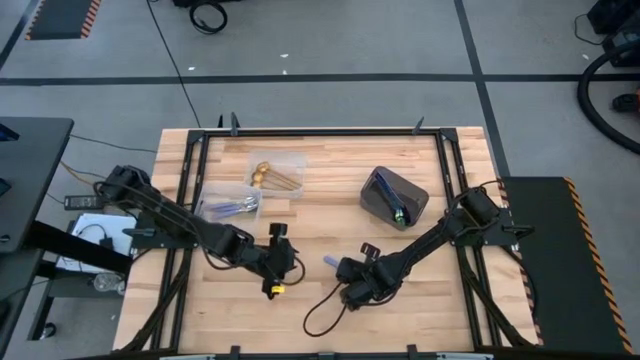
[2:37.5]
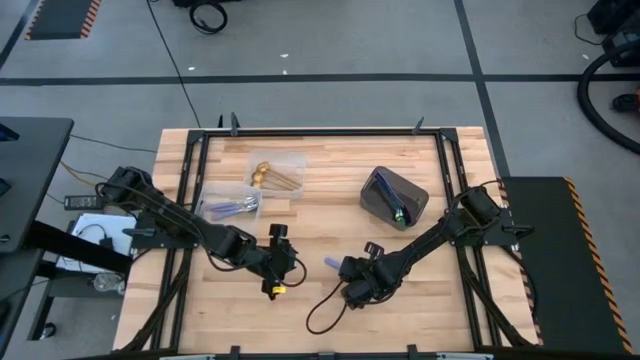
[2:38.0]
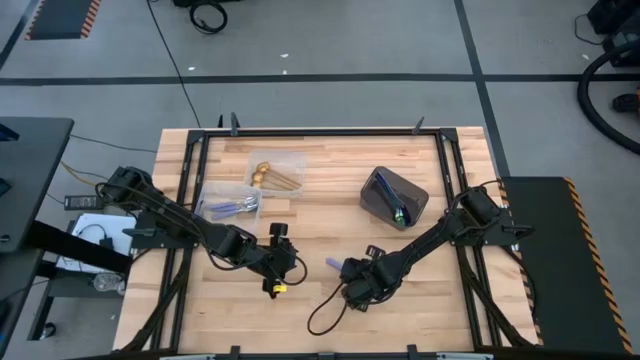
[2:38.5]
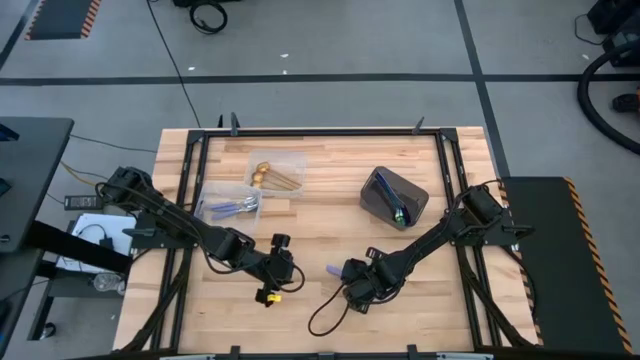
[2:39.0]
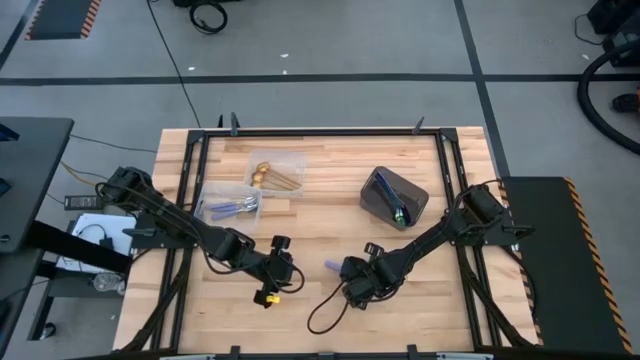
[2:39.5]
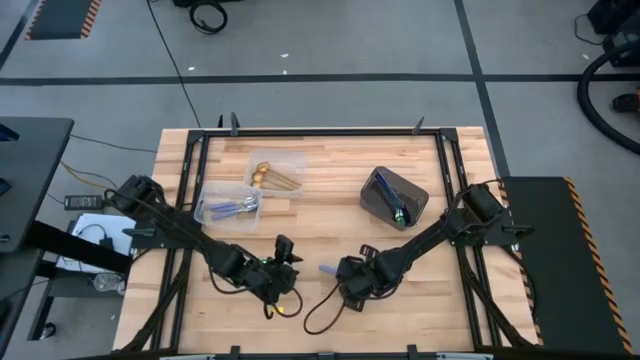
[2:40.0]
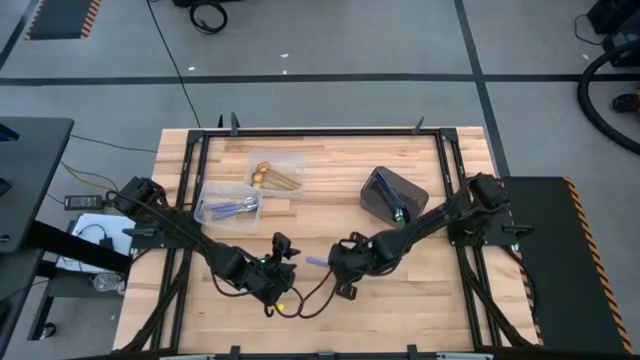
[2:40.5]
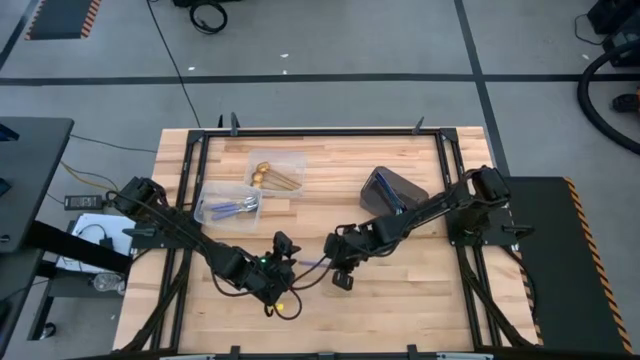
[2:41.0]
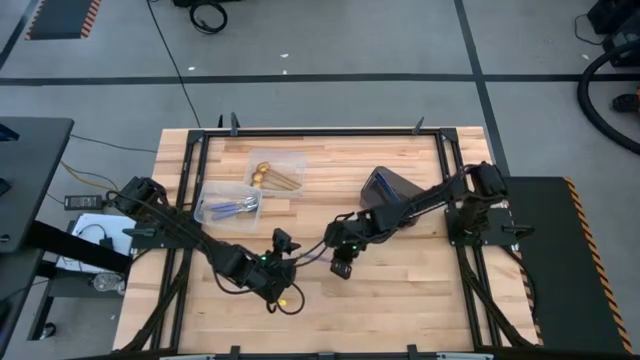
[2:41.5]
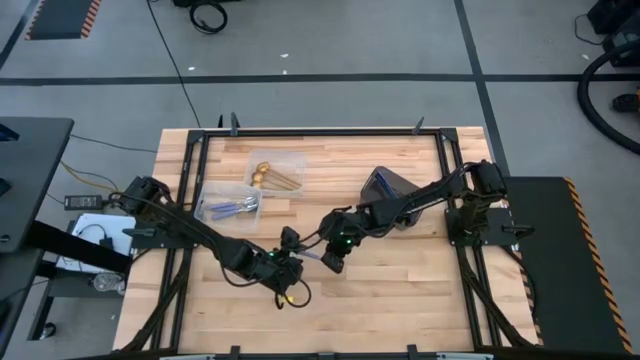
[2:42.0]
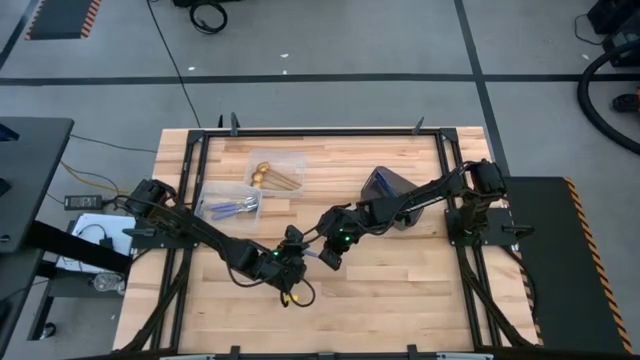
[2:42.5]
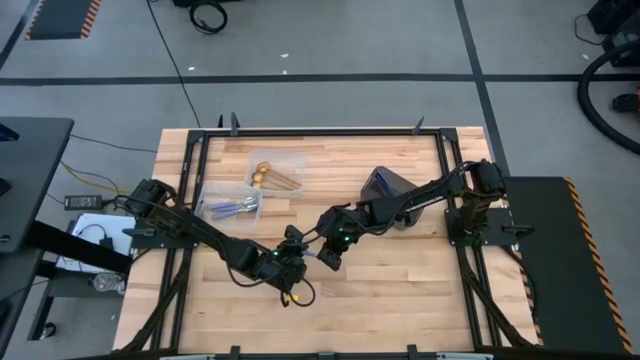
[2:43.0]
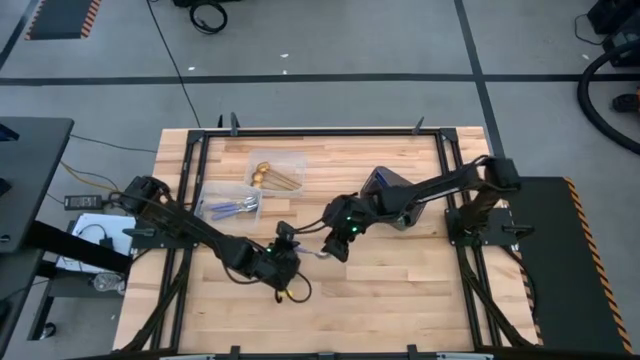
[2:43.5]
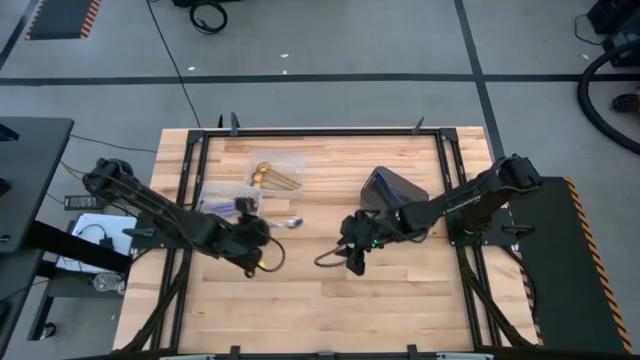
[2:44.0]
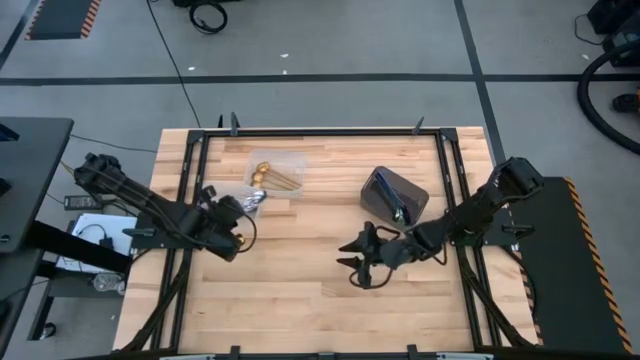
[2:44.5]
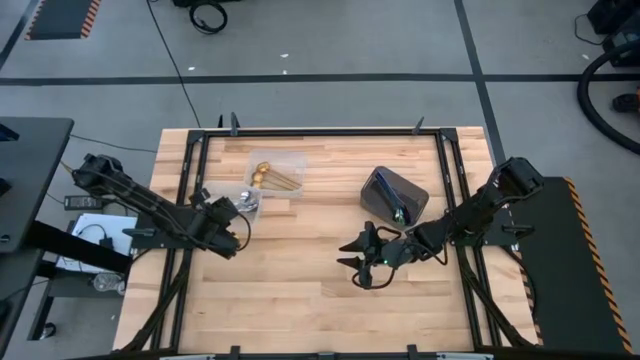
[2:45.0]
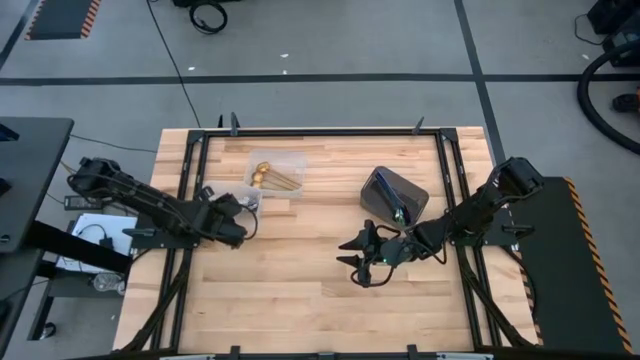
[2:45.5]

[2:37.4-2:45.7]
Task: Sort silverware by color (type)
Put the blue spoon into the bottom transparent bin

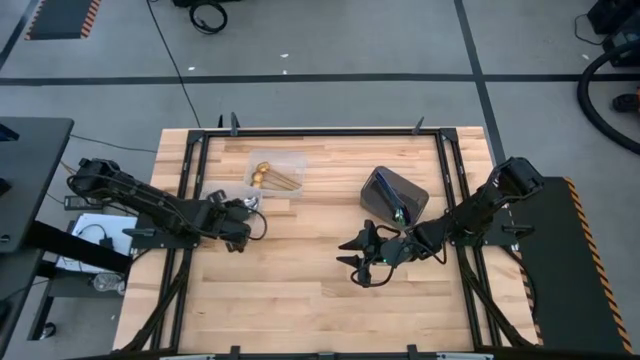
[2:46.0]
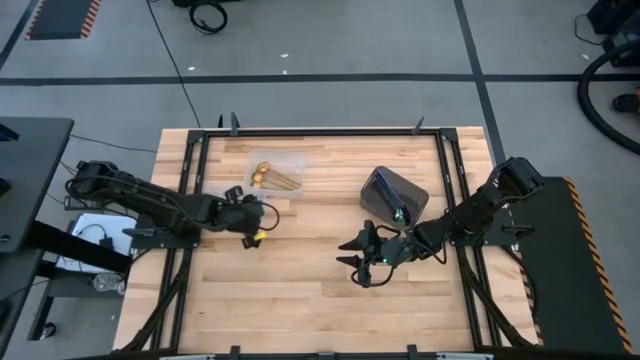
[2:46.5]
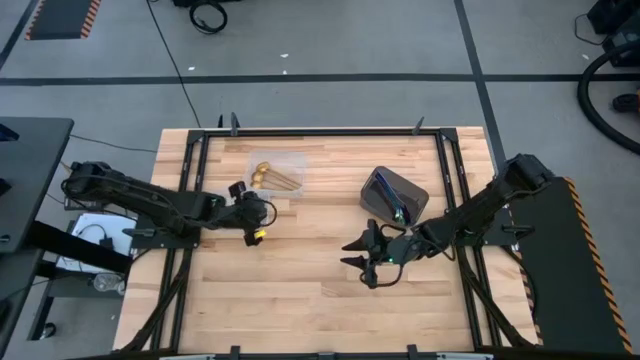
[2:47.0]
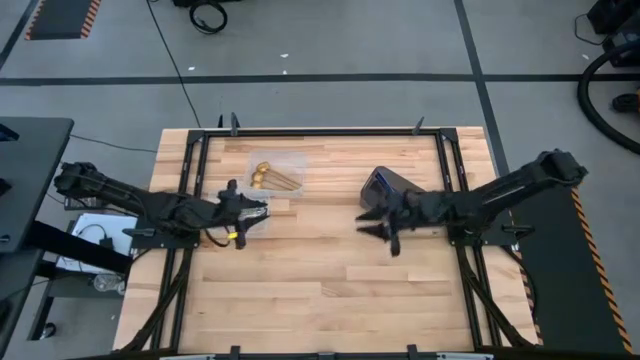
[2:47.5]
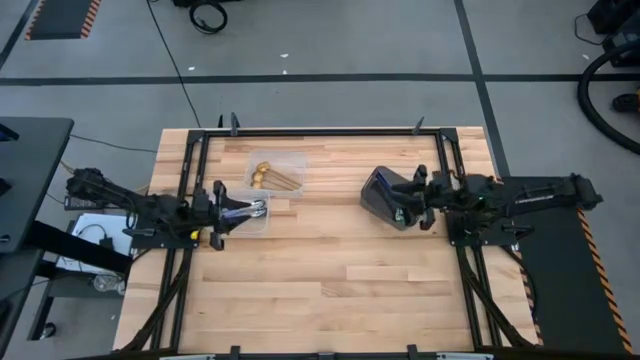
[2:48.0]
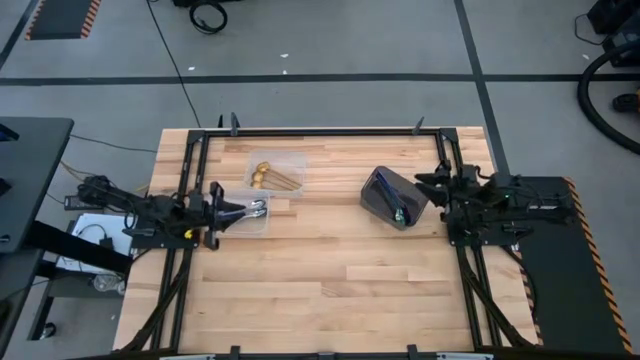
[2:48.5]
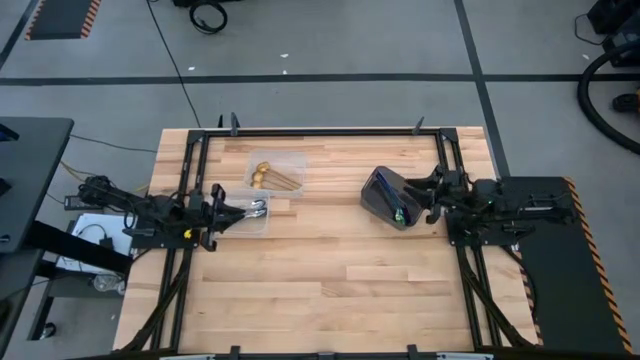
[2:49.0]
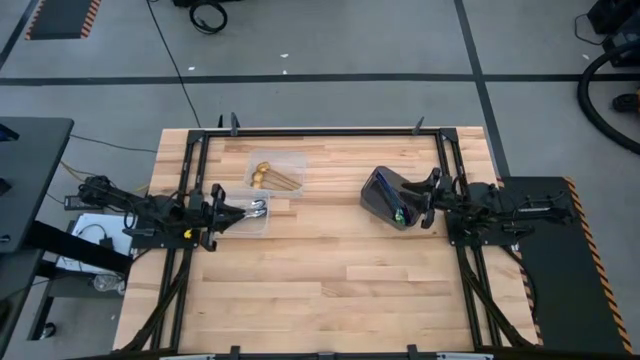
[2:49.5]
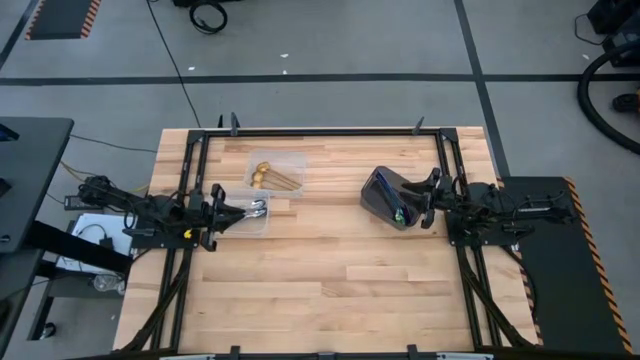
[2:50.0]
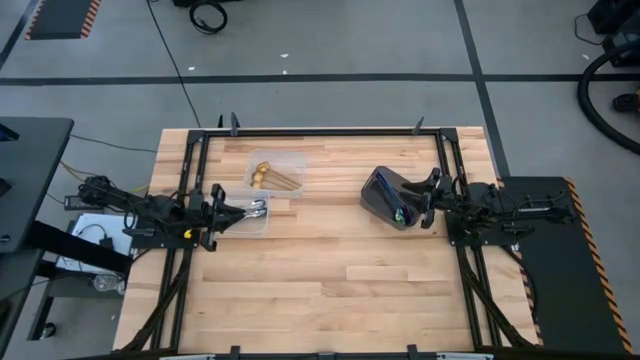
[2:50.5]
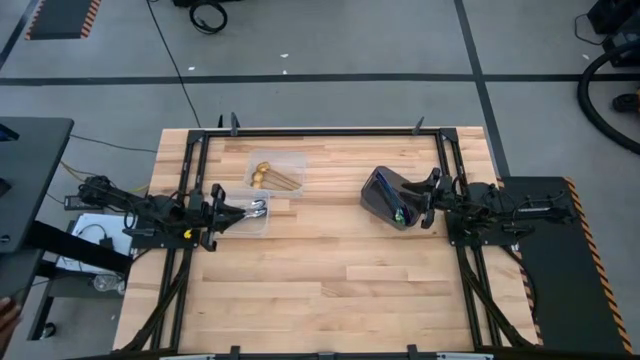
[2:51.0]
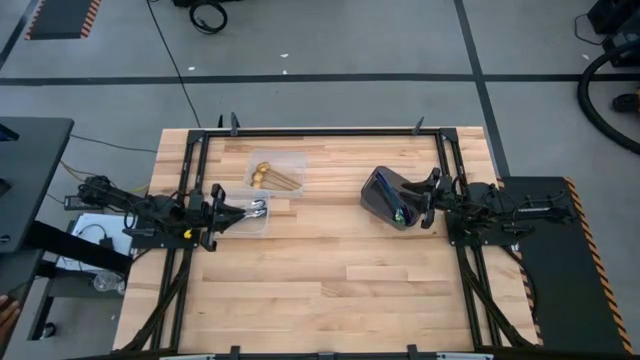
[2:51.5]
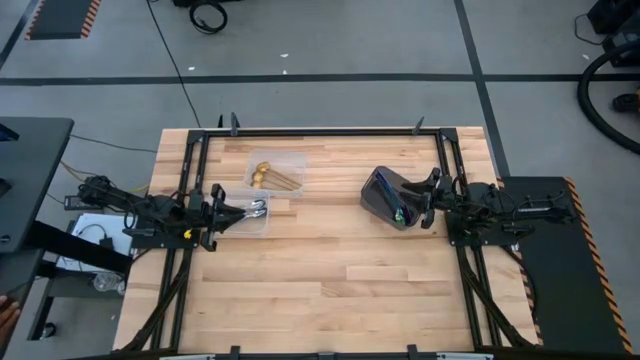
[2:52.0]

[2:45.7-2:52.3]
Return to Home Position

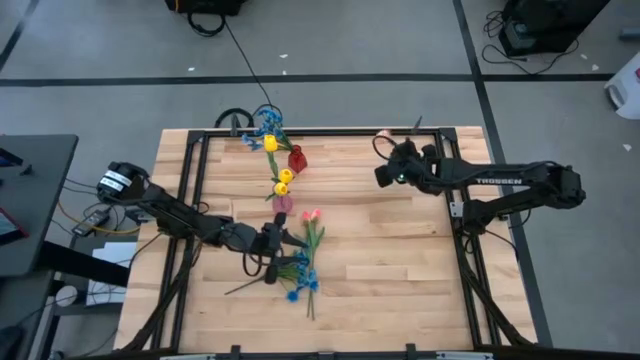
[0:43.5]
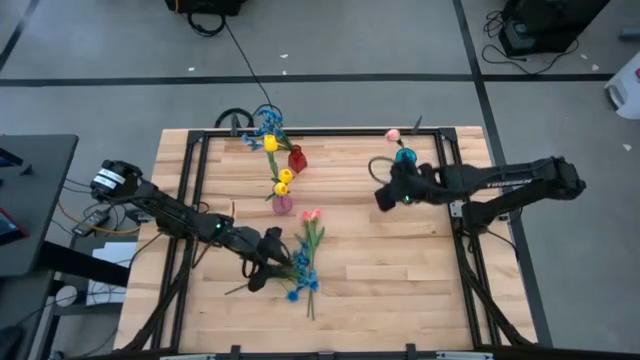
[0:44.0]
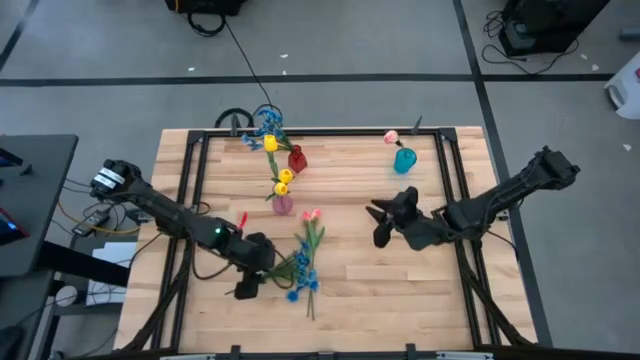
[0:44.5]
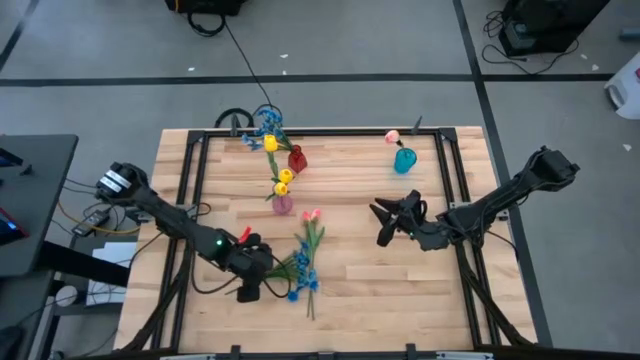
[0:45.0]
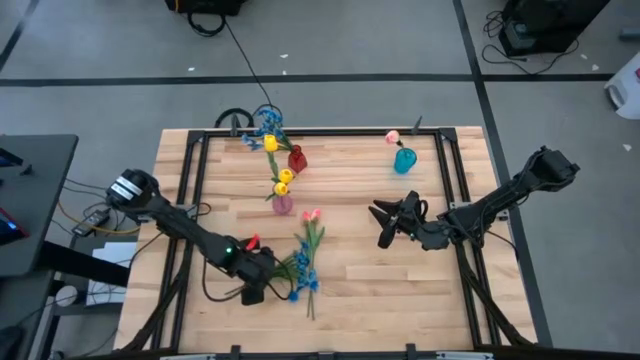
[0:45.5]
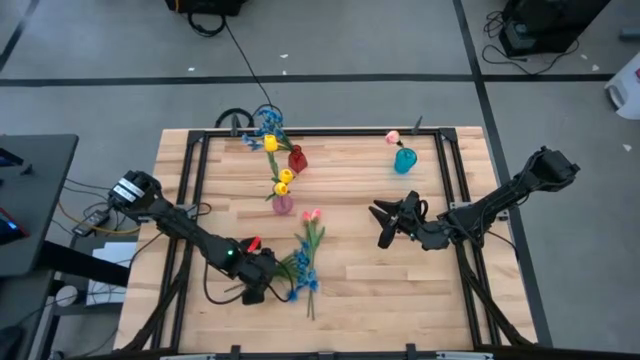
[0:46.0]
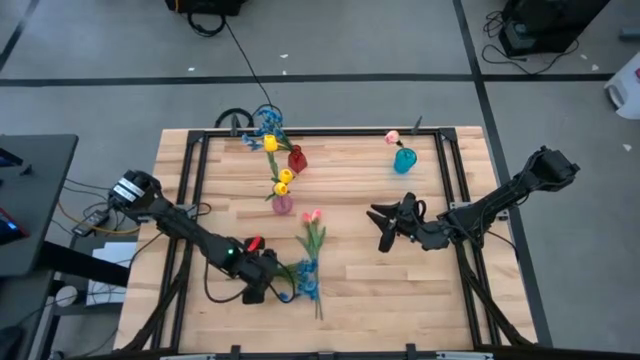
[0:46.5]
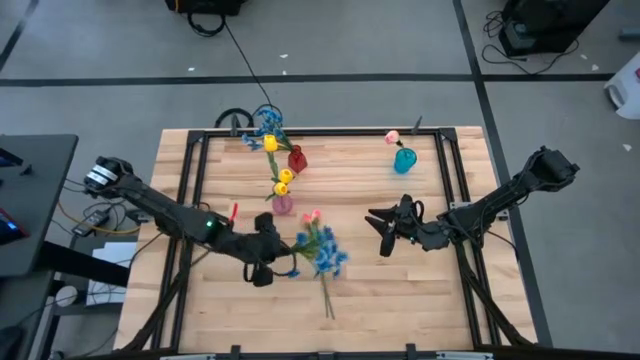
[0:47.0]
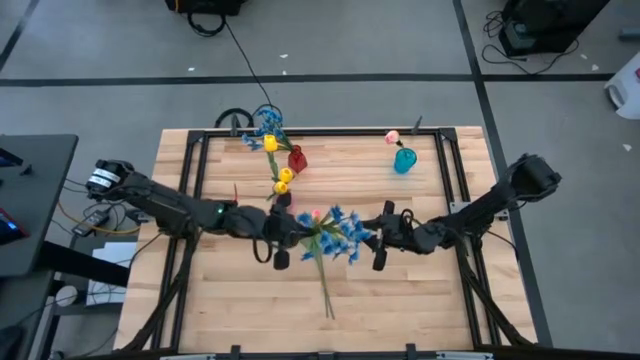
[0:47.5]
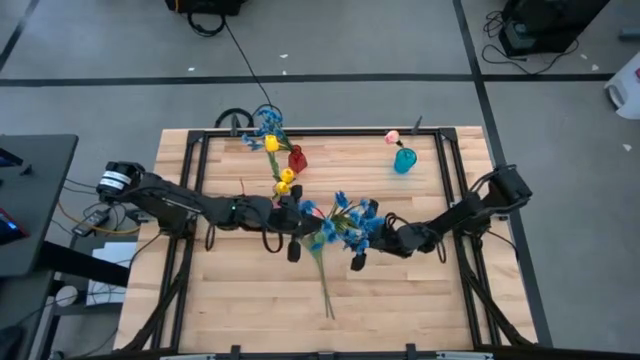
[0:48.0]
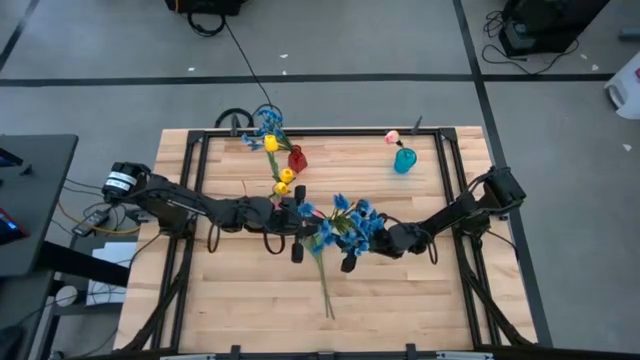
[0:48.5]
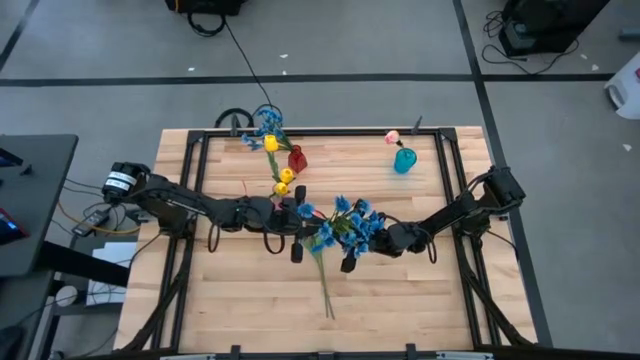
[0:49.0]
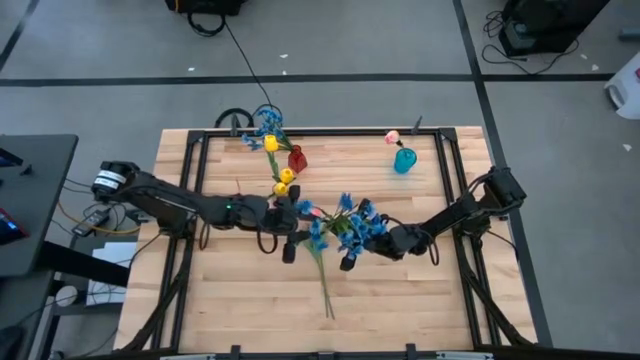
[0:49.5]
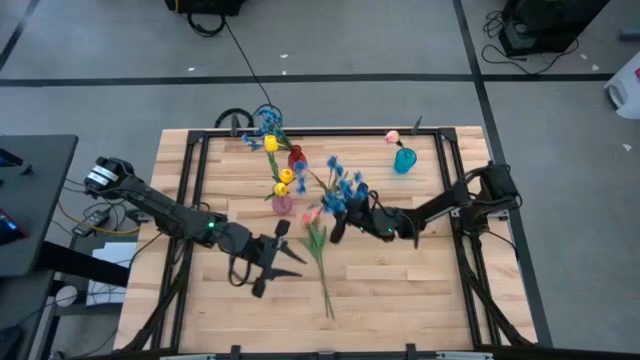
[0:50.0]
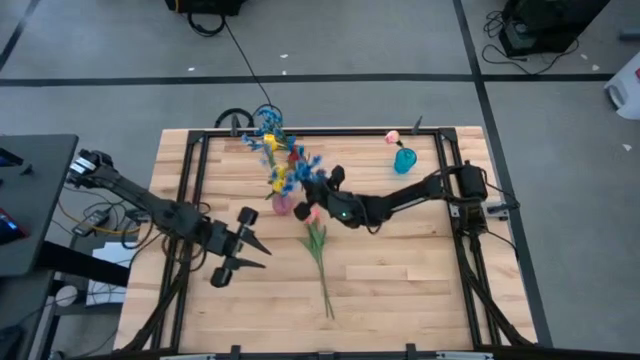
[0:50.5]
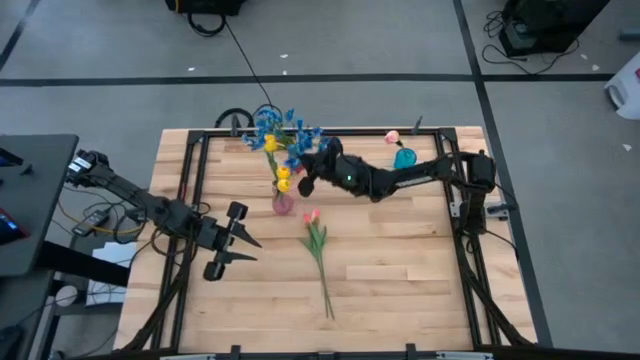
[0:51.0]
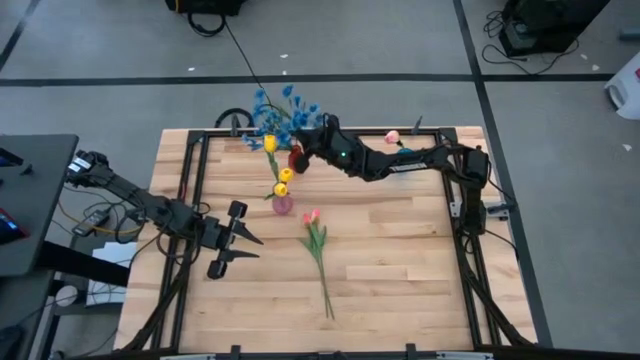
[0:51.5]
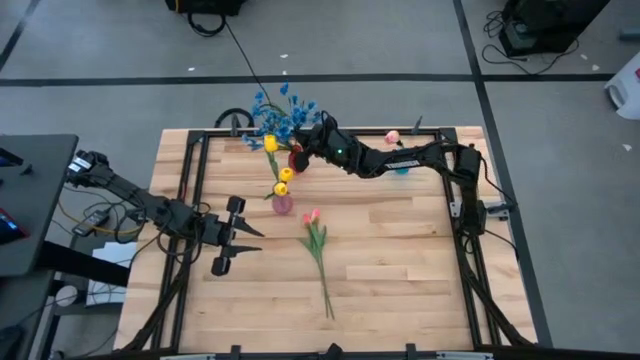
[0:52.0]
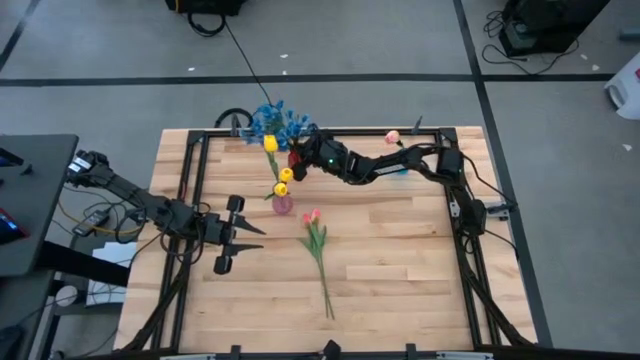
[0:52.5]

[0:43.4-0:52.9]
Task: Sort flowers into vase by color
Put the blue lily into the red vase
